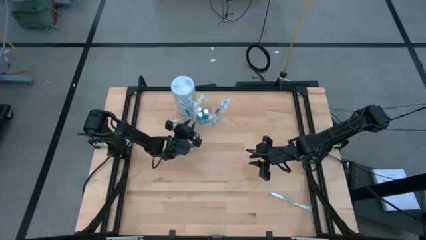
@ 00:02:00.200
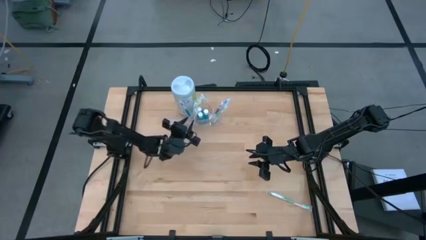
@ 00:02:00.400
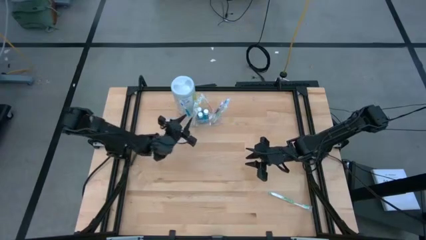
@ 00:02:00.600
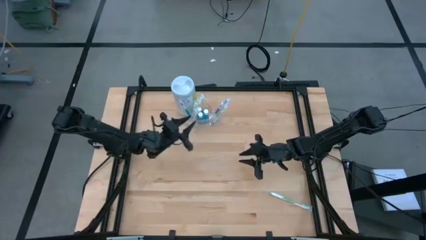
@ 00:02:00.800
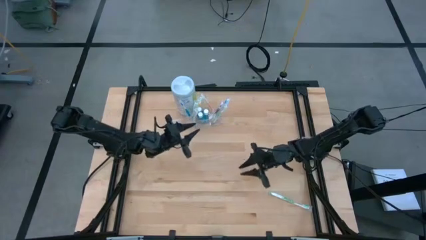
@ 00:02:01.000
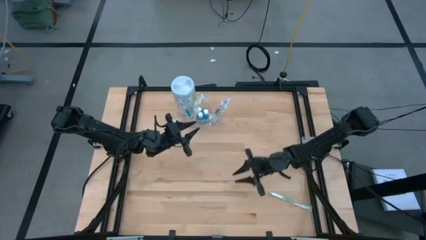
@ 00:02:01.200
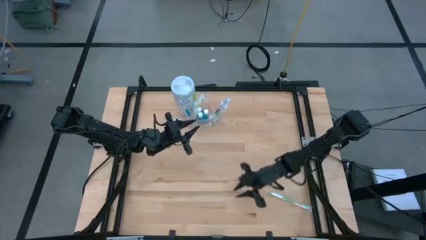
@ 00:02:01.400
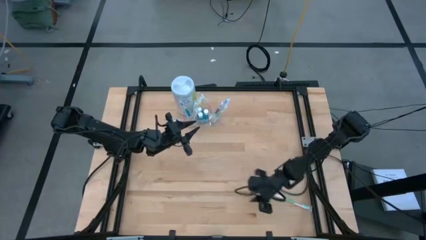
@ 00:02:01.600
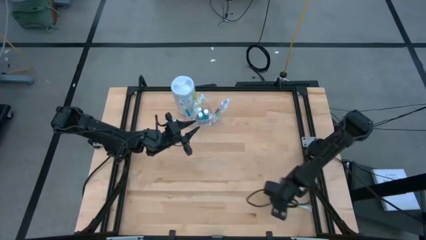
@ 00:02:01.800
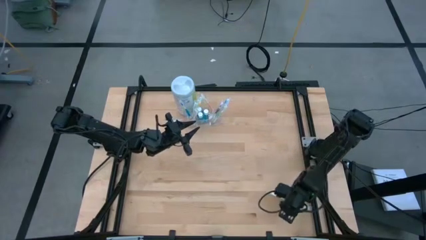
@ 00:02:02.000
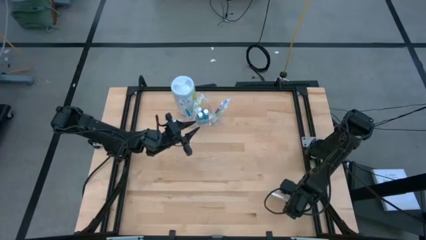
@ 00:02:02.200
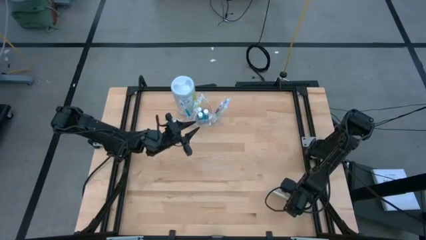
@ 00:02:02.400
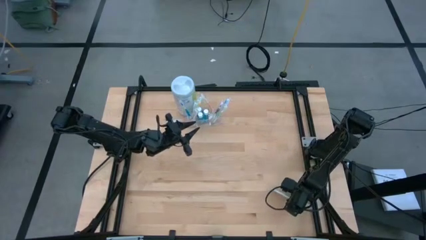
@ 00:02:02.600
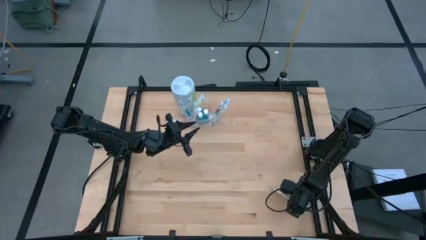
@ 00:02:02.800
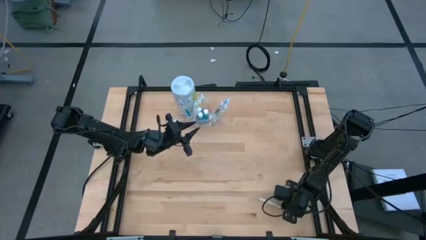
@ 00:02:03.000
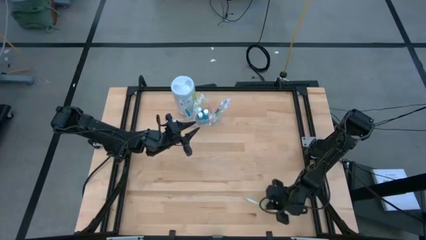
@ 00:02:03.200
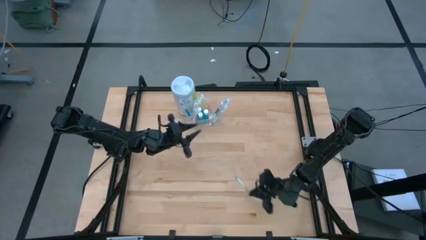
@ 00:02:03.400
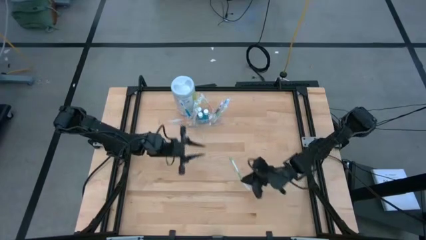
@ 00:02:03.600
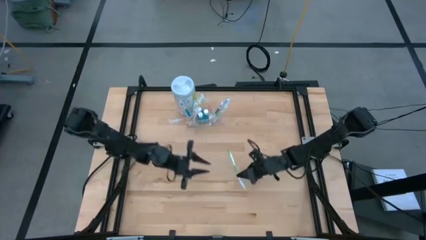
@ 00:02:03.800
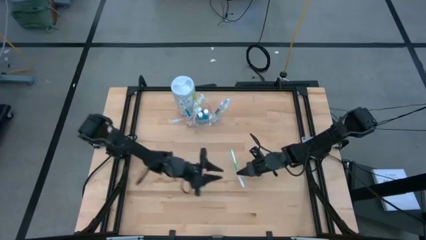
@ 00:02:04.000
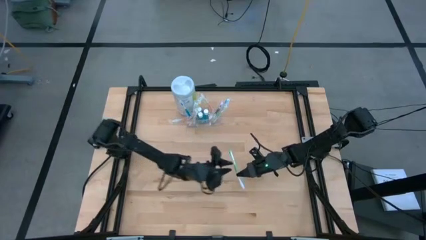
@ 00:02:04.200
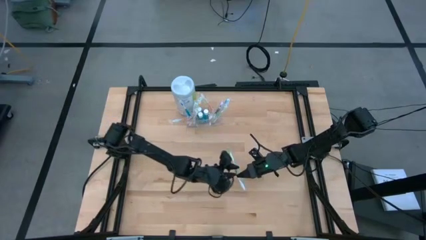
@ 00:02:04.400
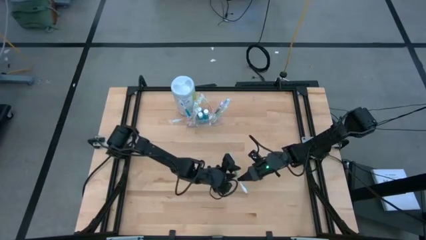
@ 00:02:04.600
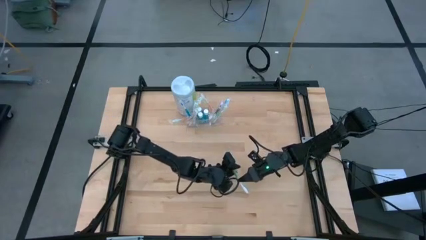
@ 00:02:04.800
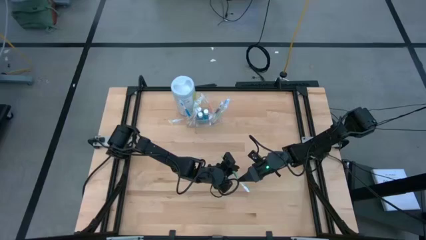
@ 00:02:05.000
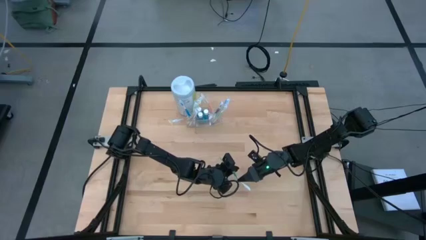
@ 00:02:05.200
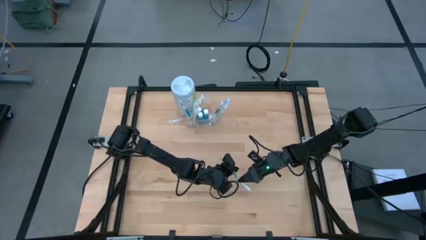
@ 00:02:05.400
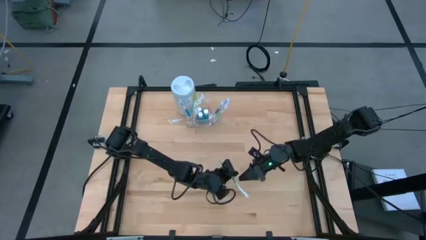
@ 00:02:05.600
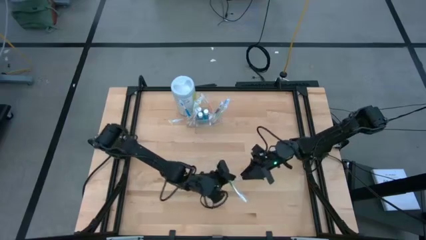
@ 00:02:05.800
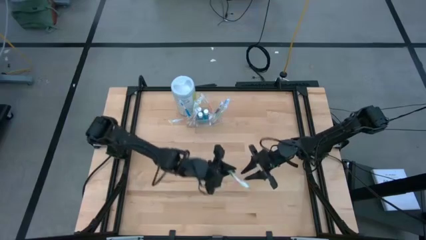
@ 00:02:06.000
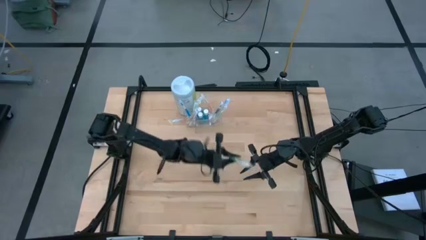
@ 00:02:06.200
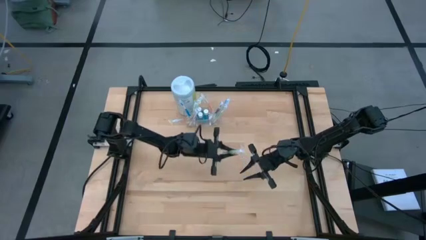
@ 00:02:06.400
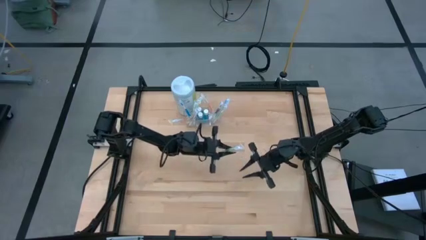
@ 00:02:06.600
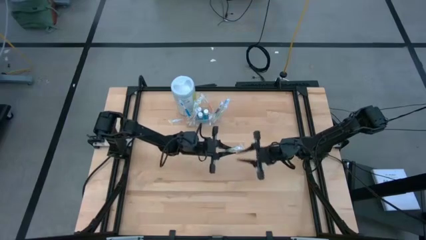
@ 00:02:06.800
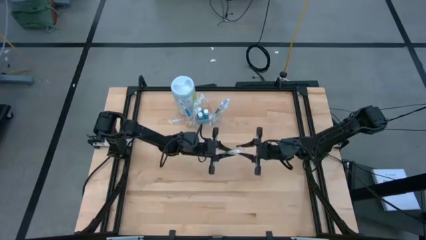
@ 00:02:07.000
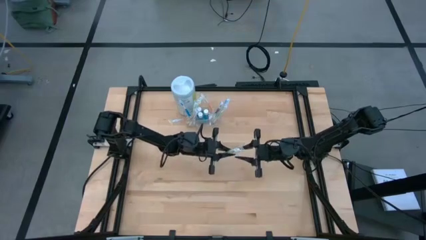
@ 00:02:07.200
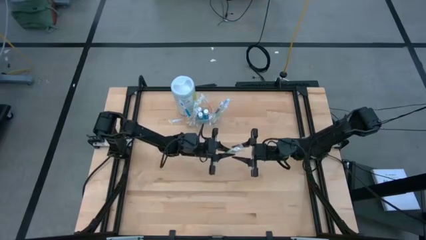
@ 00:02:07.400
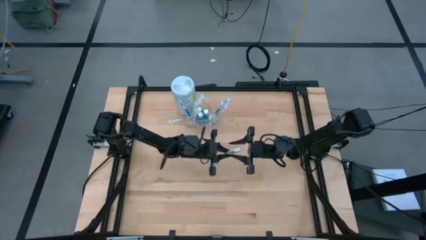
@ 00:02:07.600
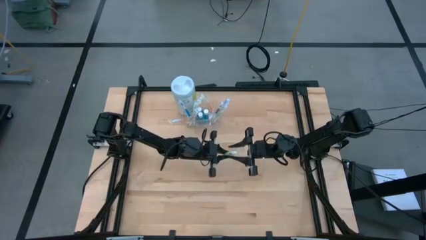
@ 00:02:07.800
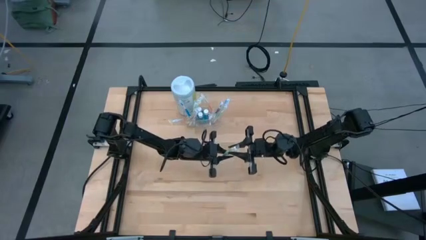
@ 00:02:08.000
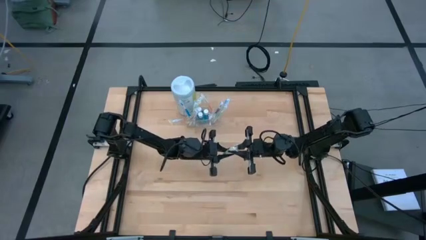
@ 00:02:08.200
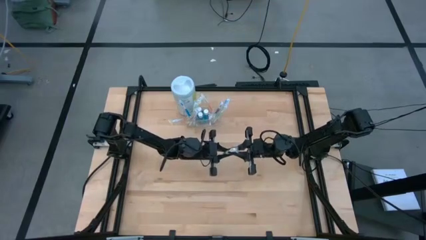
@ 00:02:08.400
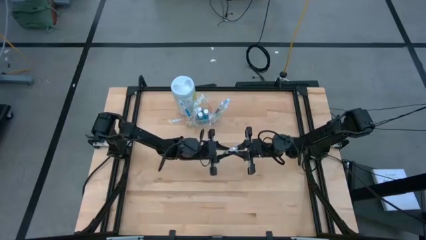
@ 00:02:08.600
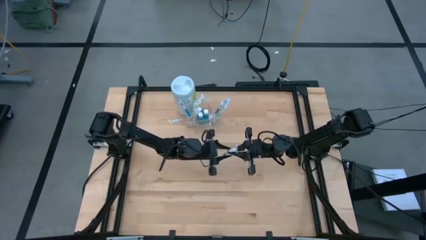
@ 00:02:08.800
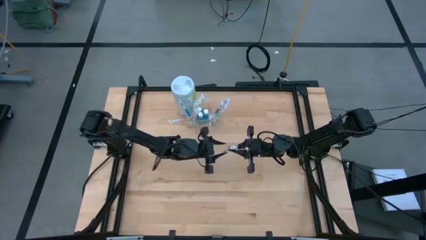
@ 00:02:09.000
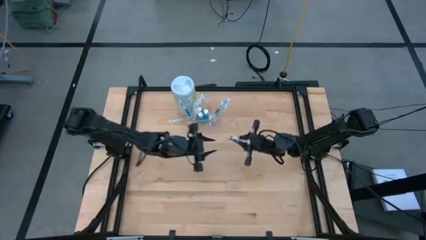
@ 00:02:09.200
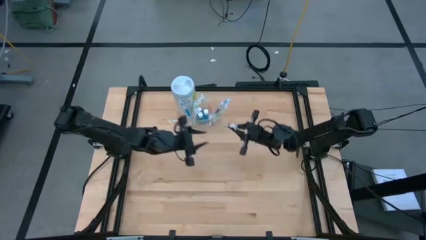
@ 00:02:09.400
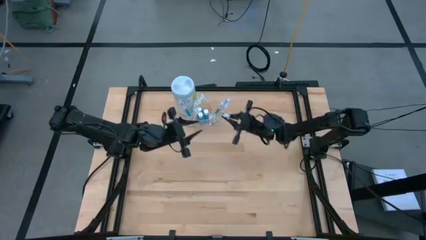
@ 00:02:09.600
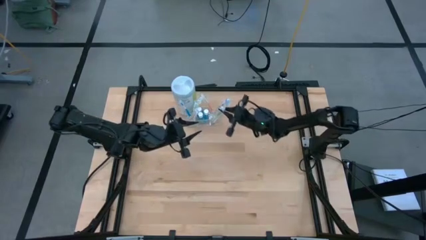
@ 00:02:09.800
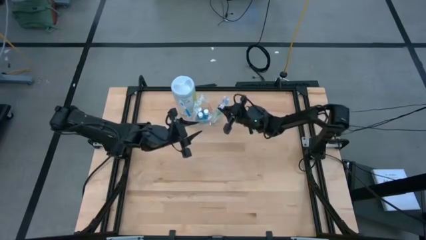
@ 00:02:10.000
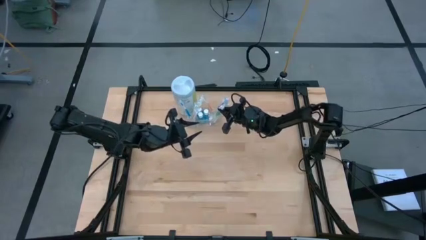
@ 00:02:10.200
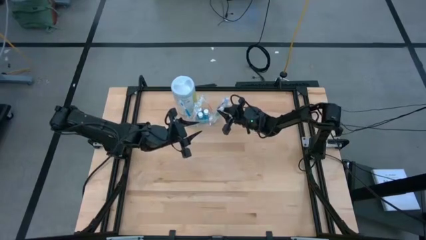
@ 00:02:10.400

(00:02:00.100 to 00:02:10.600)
Task: Pick & Place toothbrushing station
Put the green toothbrush into the transparent organizer

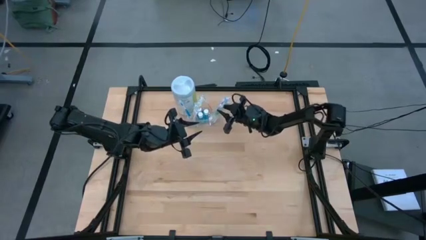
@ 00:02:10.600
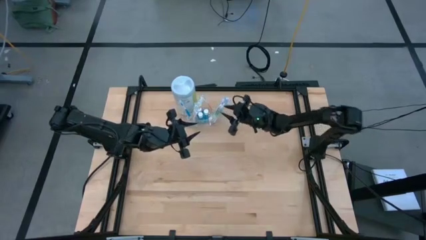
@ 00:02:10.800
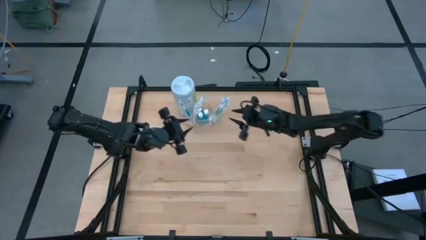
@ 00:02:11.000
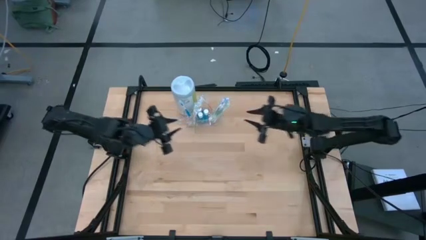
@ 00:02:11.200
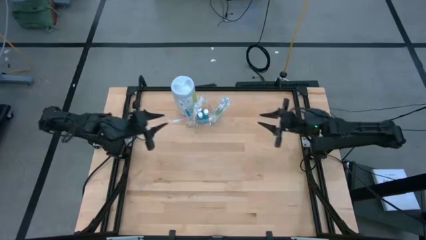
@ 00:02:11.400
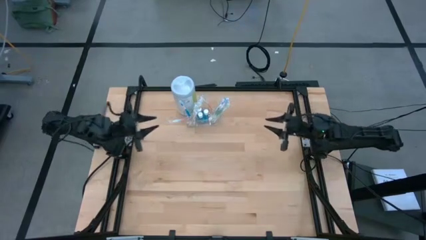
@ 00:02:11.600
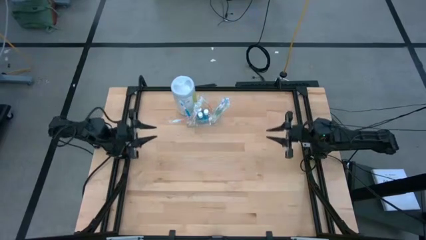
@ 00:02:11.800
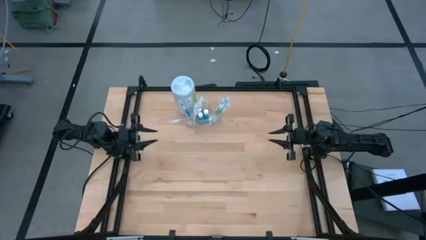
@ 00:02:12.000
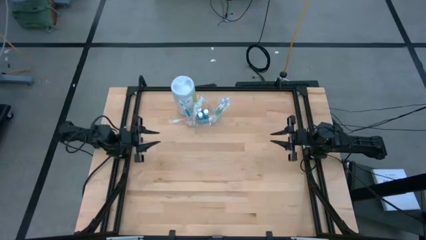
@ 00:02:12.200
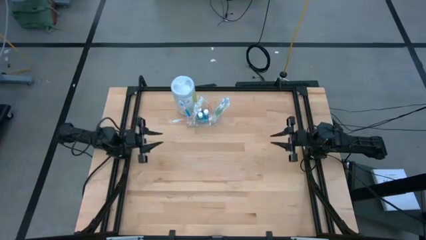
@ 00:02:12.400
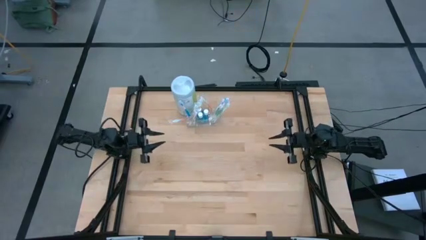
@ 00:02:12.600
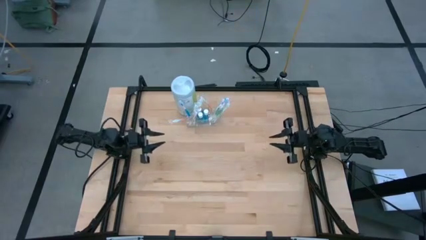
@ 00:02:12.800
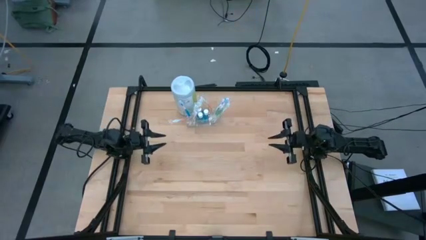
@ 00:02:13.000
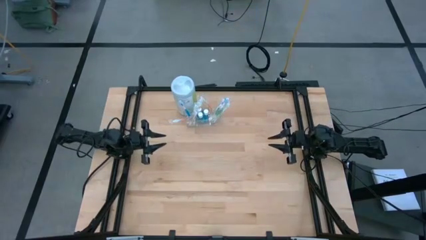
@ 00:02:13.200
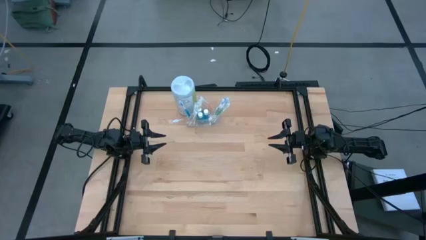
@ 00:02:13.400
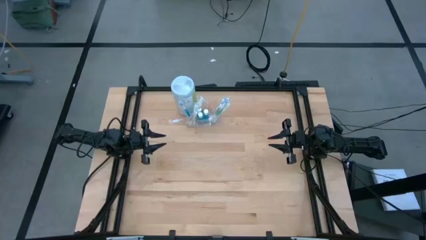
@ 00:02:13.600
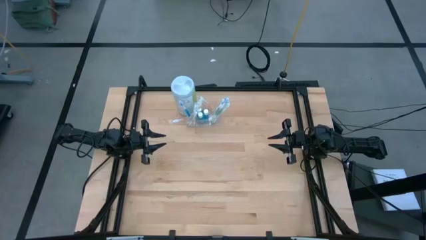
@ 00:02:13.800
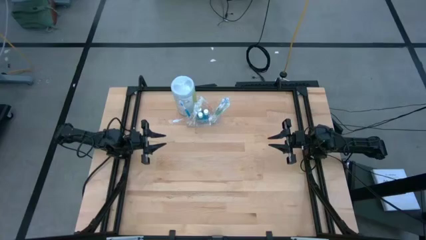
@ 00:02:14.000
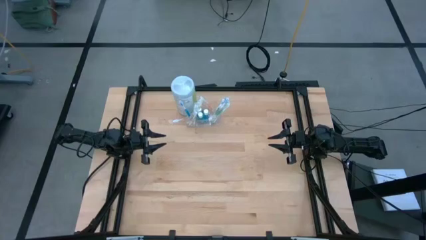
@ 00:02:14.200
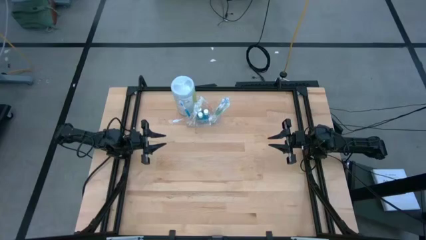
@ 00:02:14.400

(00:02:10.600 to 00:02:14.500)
Return to Home Position
